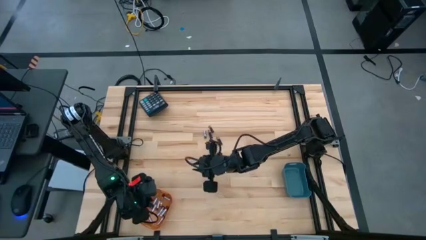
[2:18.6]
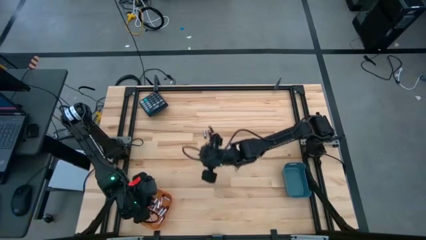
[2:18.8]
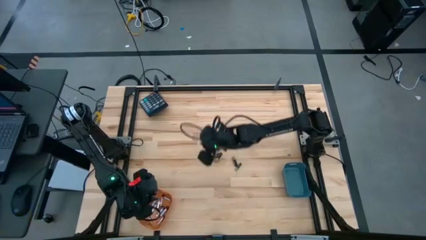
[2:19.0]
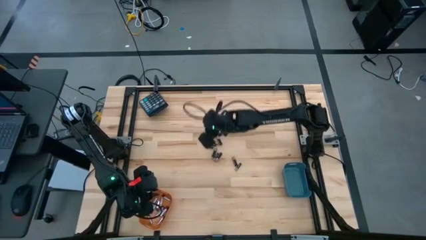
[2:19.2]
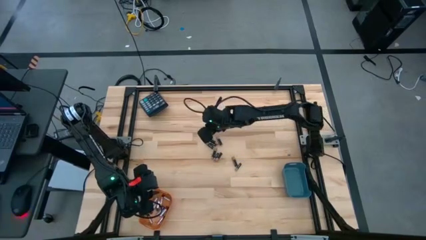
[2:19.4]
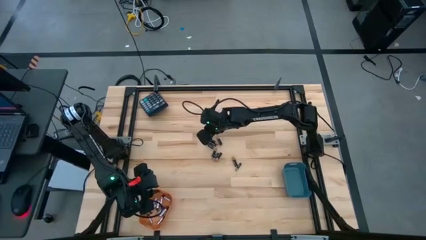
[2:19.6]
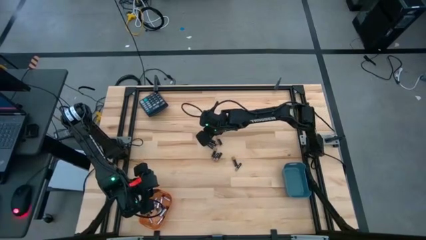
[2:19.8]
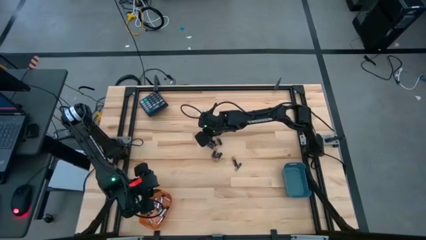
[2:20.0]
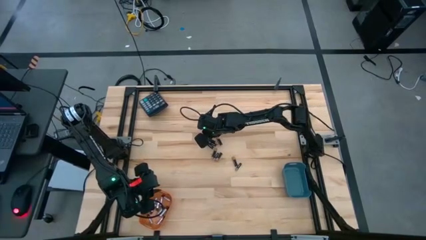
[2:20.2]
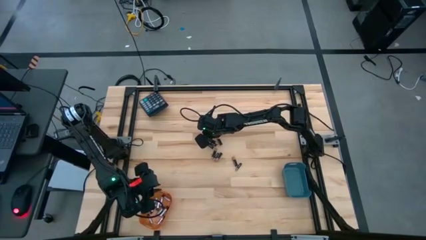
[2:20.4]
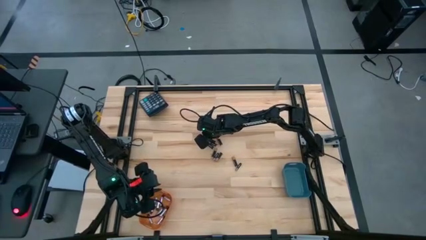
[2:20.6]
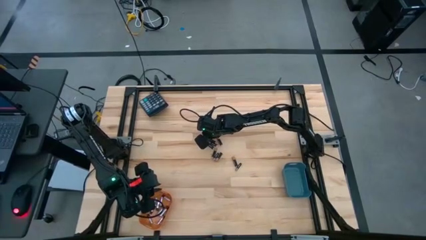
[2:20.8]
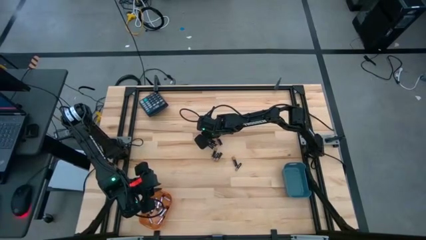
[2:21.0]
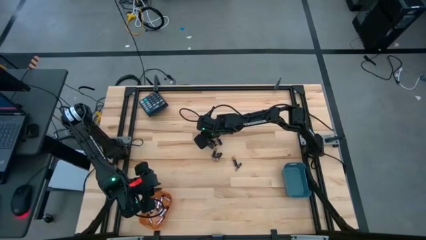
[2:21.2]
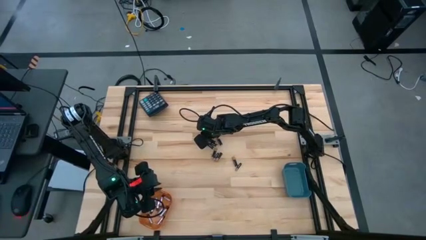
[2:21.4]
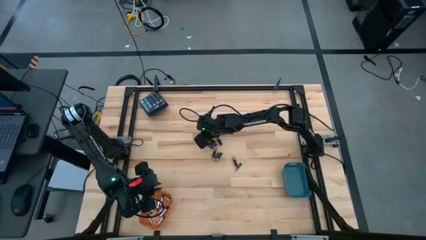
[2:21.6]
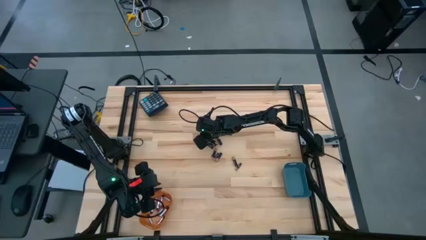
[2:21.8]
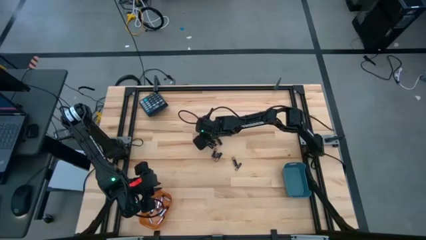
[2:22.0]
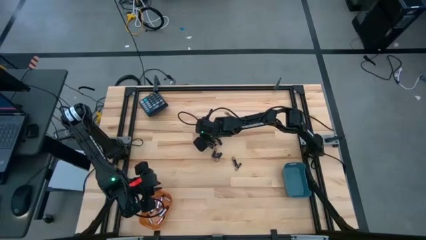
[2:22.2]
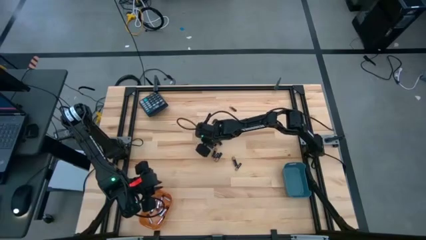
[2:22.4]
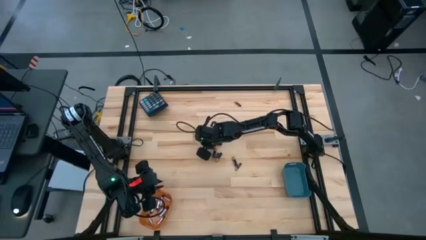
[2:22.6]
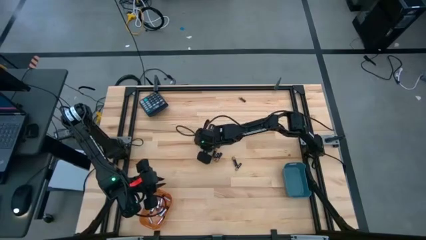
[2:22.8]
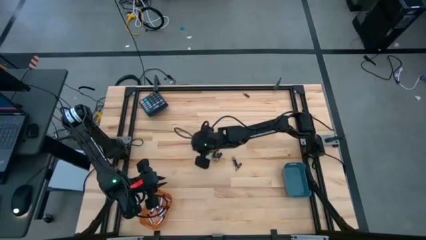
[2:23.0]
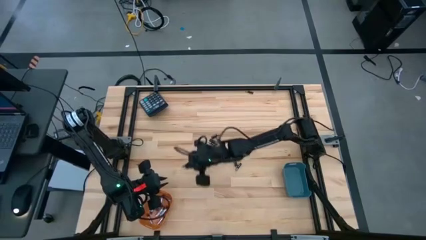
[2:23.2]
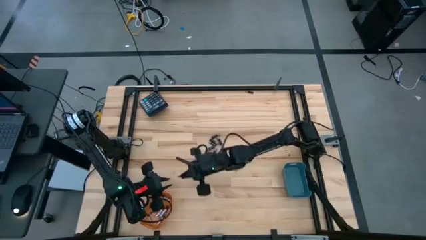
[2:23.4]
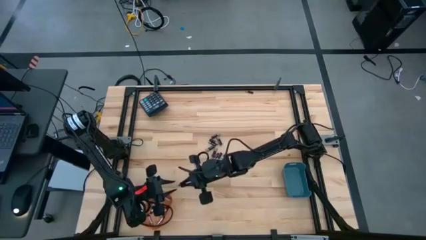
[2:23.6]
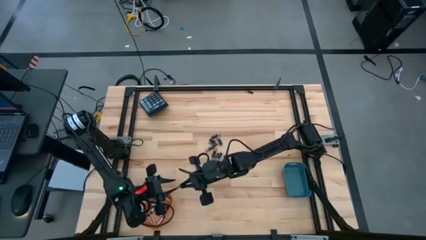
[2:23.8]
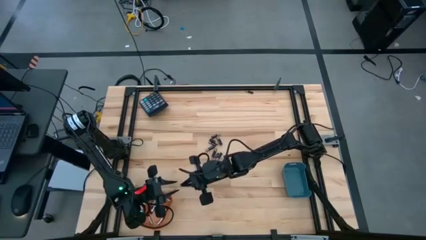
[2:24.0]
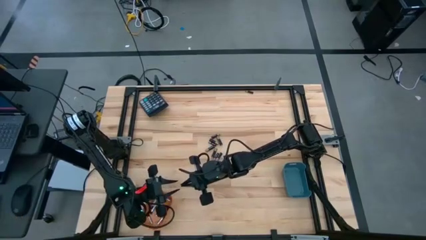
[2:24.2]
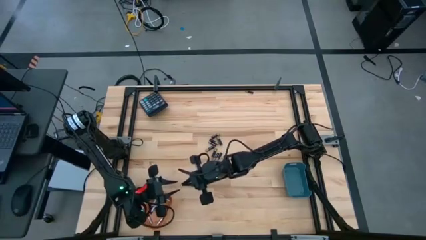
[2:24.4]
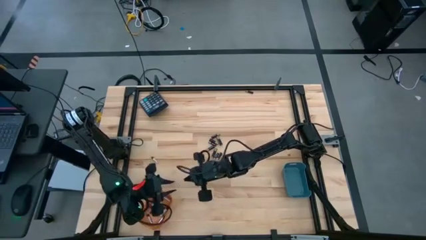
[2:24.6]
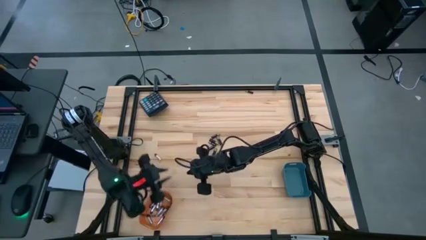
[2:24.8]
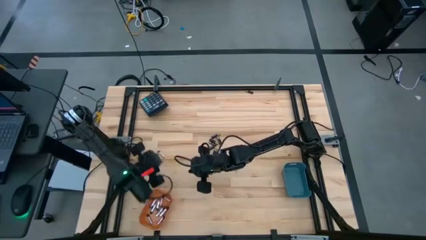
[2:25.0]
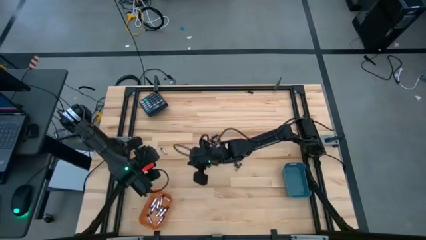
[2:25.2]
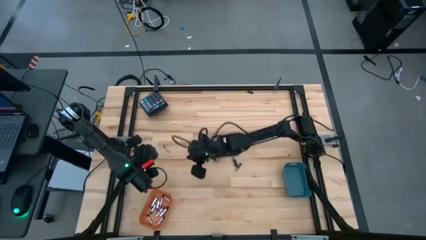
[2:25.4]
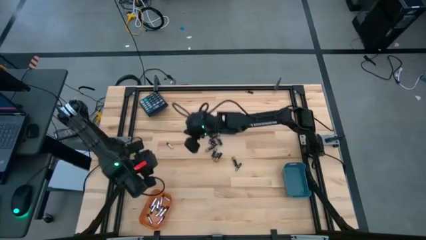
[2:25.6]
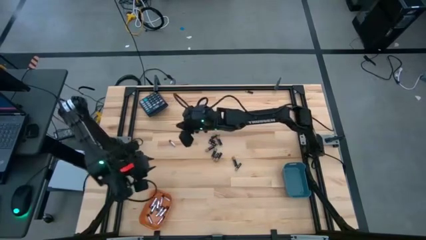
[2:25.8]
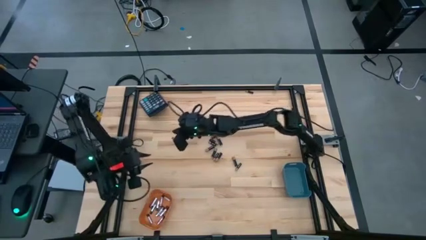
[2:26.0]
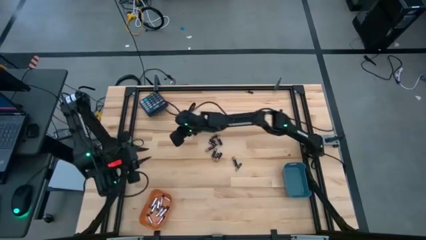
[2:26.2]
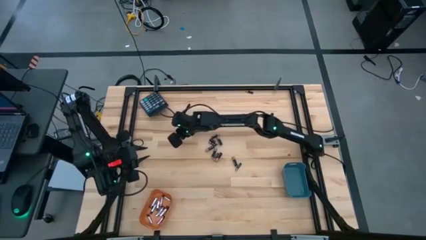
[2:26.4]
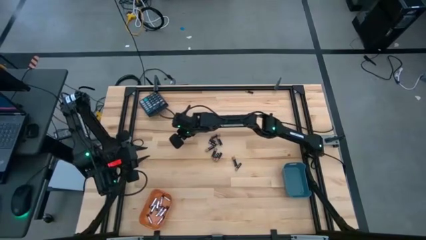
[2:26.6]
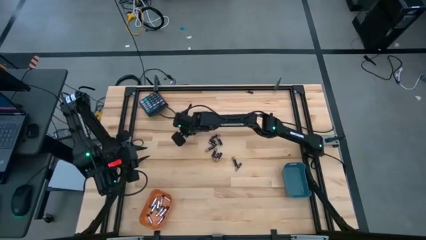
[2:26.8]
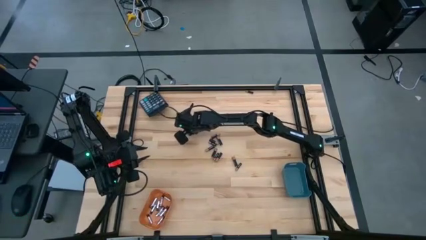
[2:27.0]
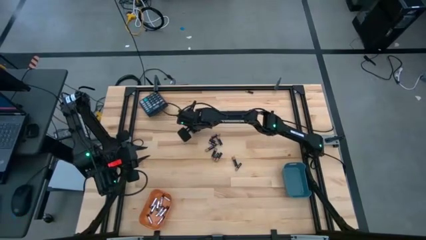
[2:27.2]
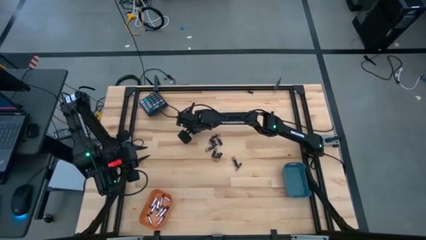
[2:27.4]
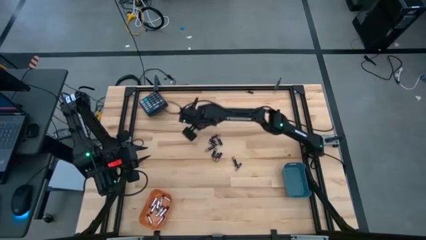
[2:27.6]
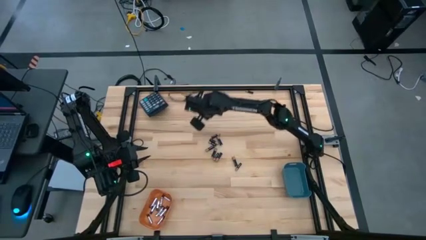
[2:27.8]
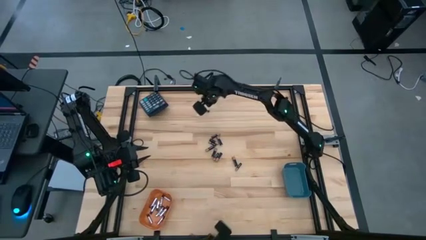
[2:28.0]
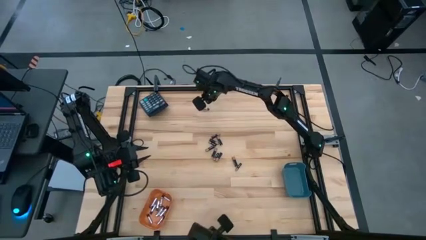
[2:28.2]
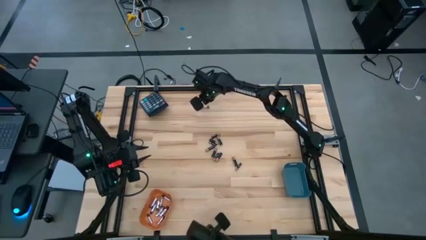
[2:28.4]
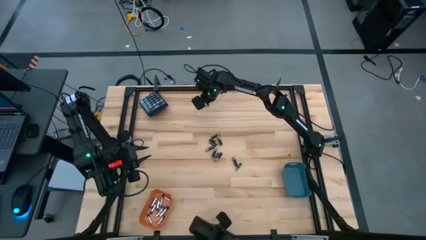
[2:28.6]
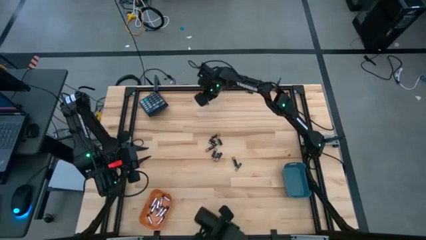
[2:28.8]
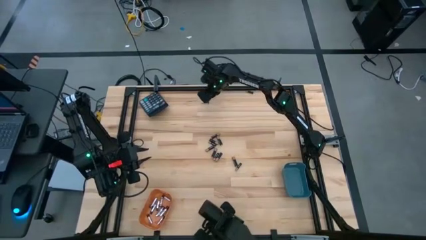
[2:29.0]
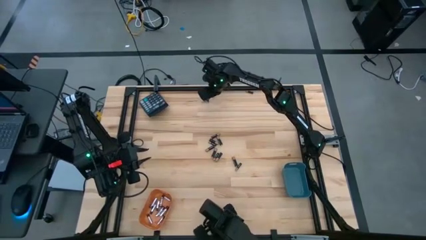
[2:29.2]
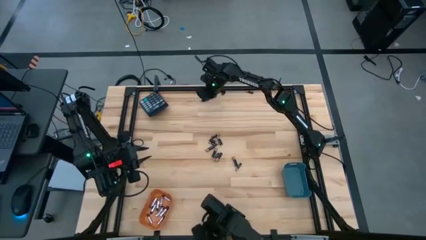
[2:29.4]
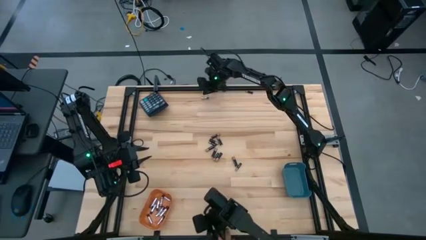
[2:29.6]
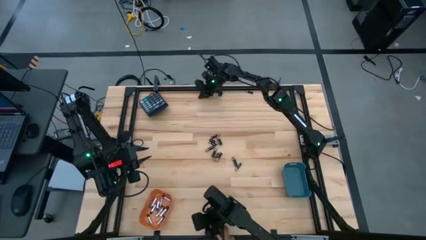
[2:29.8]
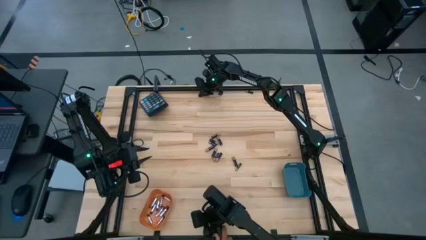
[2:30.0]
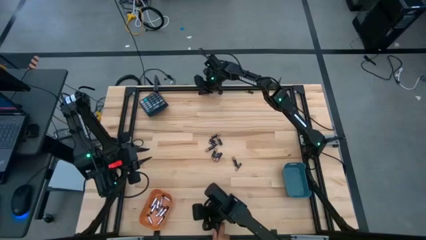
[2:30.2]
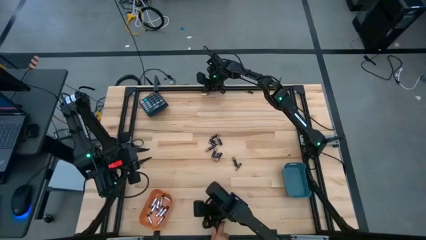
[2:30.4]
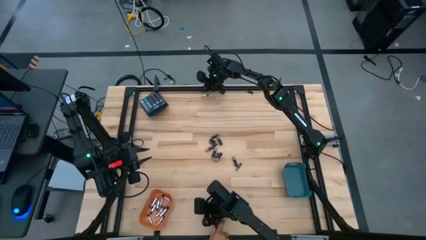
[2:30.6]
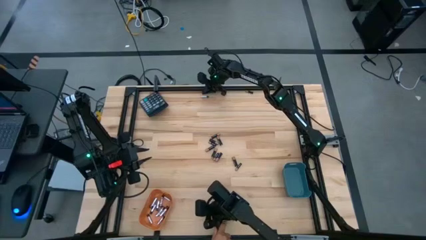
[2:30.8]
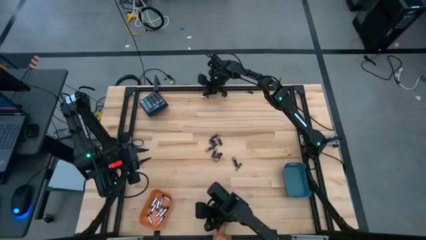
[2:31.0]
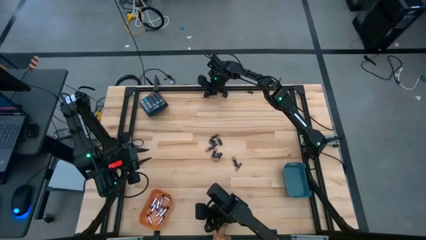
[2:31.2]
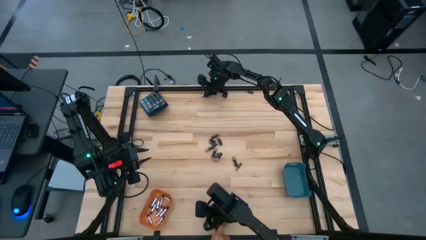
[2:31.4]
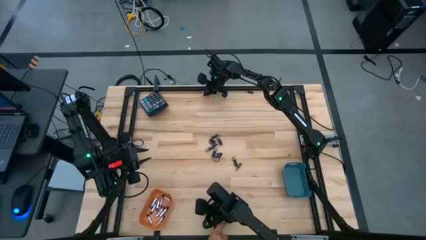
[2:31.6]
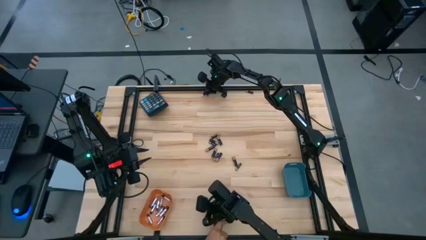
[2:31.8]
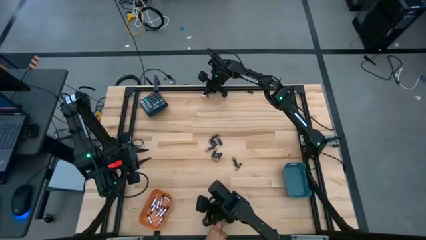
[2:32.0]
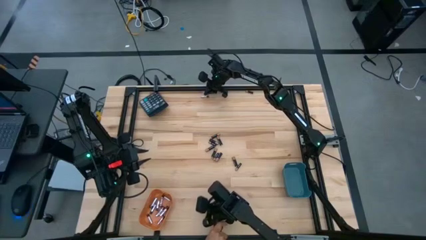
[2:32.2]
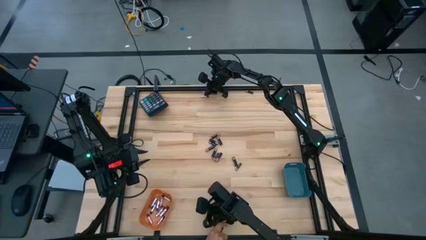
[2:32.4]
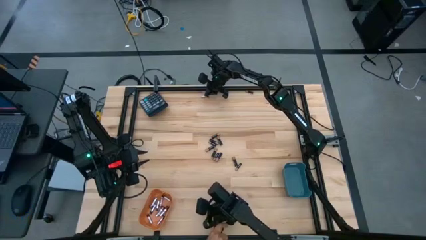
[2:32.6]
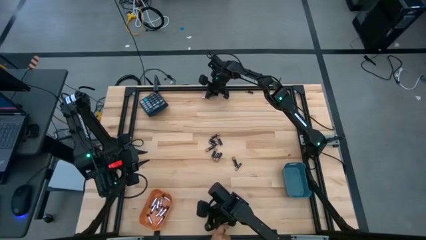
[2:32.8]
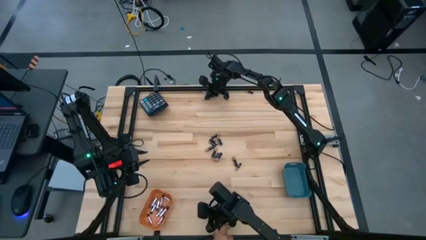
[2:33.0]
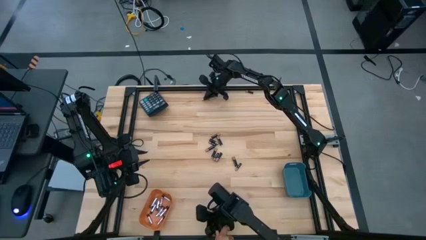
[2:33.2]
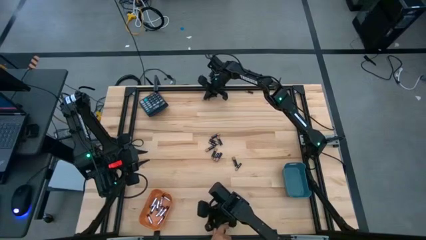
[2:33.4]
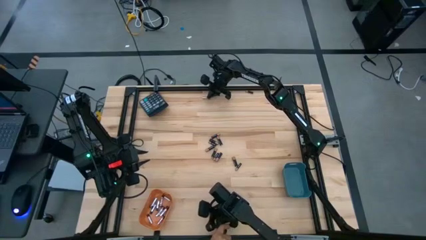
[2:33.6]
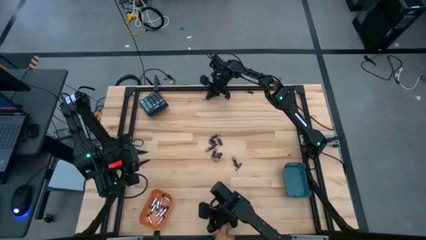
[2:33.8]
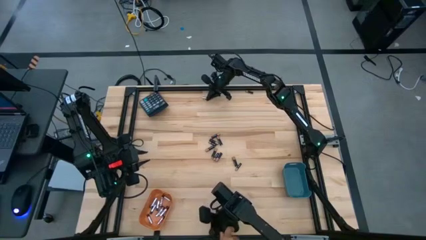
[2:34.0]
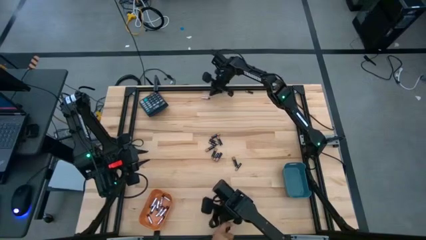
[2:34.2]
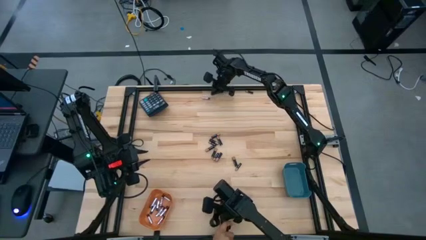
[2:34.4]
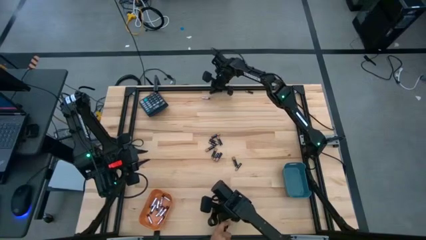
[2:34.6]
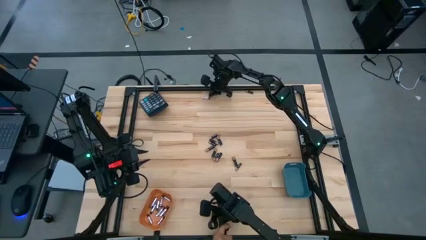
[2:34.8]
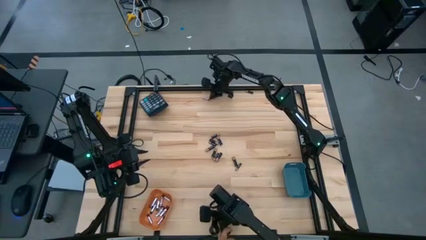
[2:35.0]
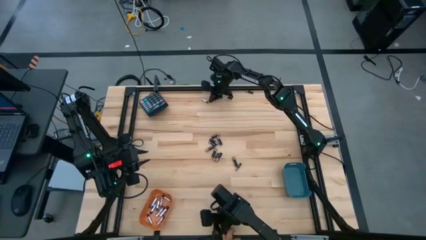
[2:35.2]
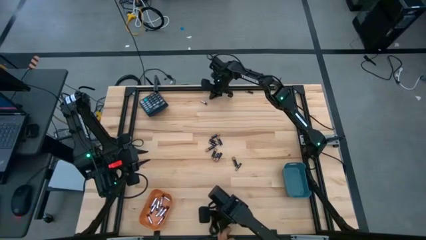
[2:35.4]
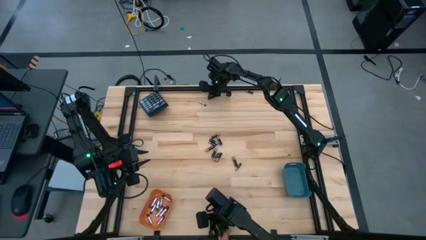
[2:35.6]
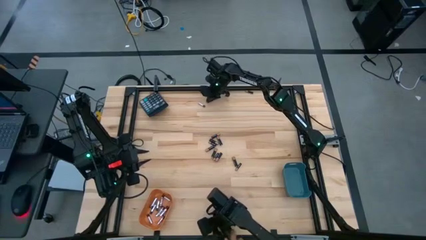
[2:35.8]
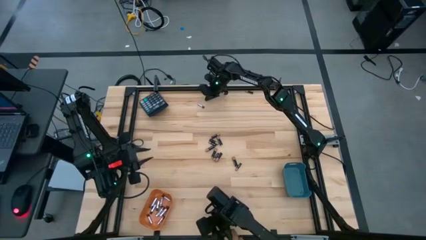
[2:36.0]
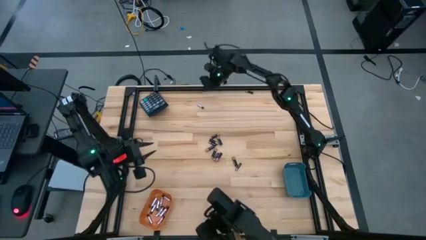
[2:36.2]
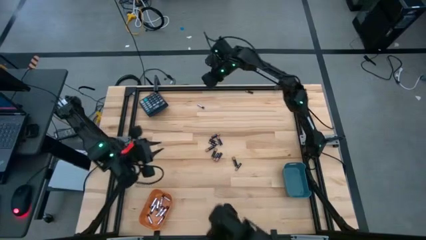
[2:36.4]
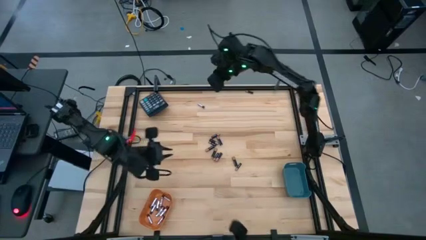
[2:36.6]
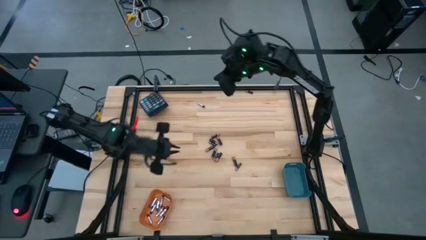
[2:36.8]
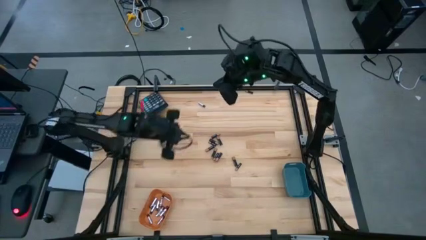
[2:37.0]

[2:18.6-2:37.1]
Task: Sort batteries
Put the silver battery into the orange bin
